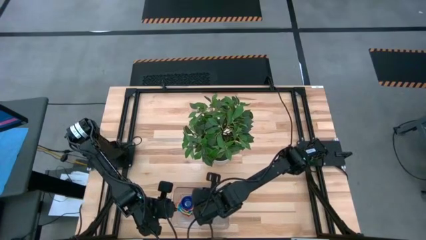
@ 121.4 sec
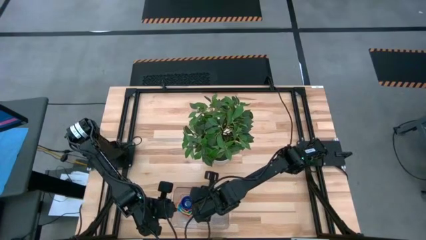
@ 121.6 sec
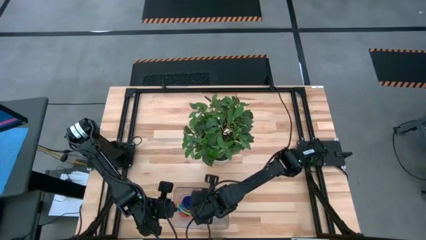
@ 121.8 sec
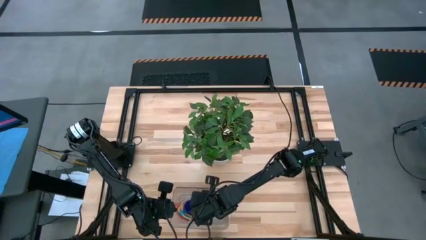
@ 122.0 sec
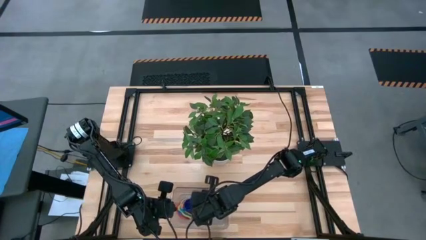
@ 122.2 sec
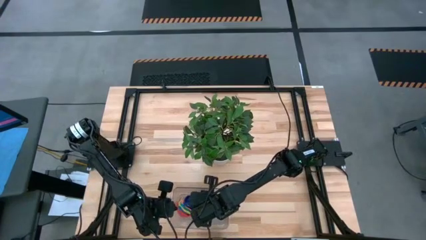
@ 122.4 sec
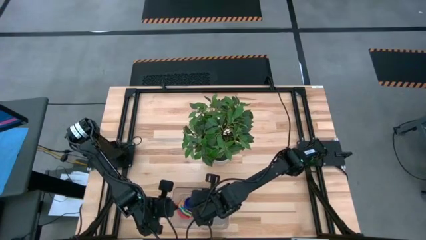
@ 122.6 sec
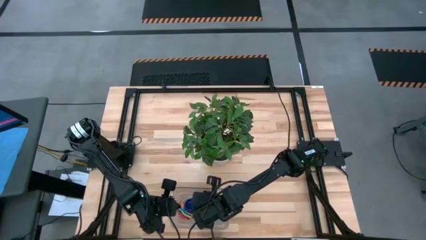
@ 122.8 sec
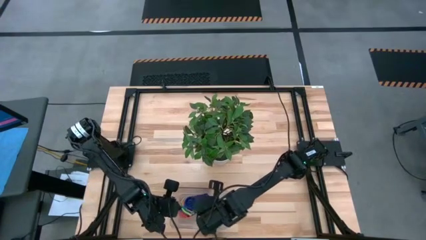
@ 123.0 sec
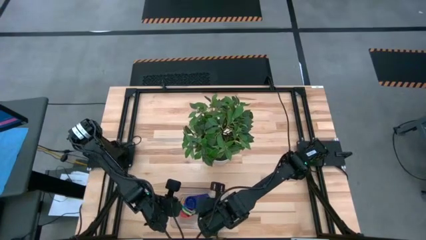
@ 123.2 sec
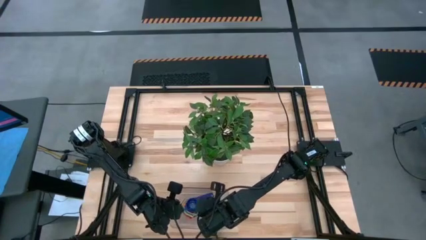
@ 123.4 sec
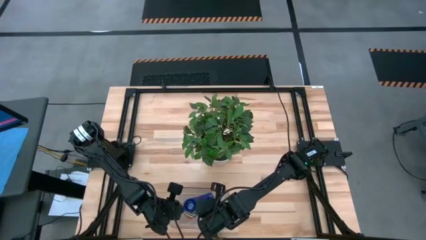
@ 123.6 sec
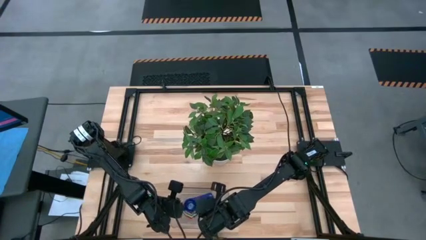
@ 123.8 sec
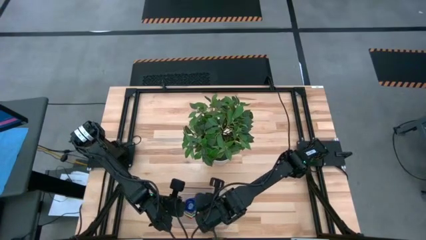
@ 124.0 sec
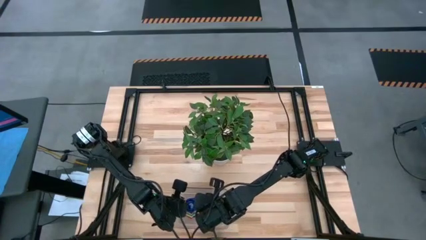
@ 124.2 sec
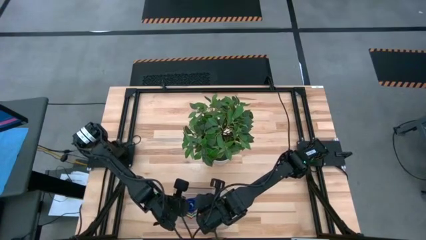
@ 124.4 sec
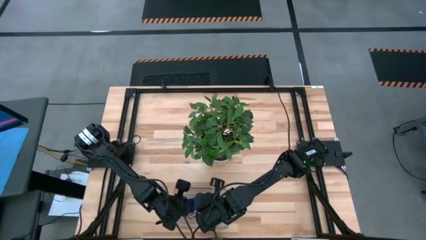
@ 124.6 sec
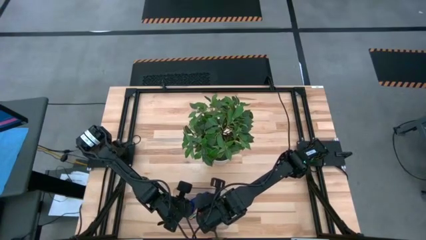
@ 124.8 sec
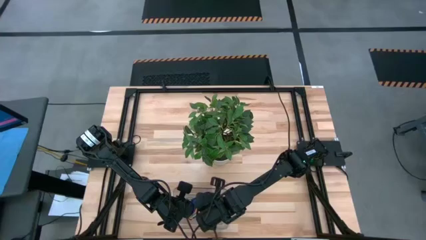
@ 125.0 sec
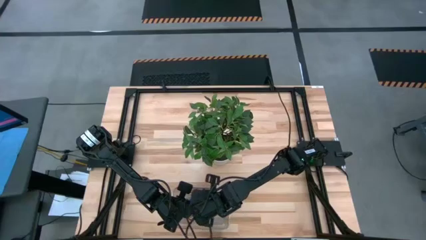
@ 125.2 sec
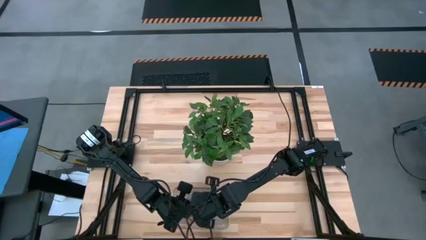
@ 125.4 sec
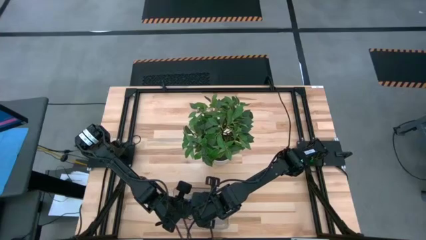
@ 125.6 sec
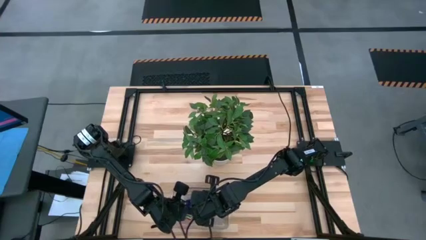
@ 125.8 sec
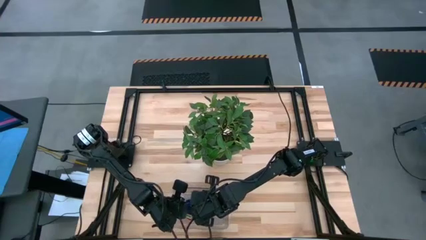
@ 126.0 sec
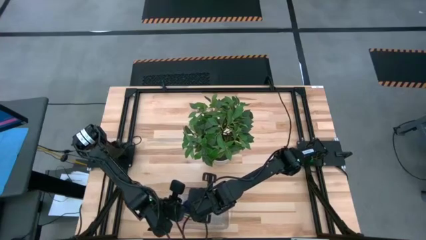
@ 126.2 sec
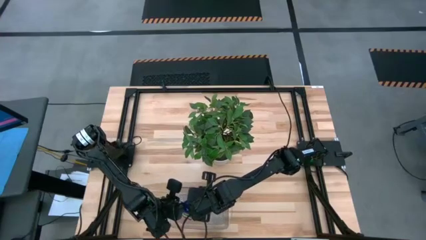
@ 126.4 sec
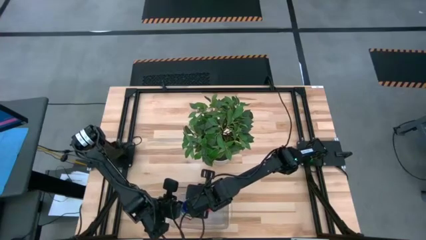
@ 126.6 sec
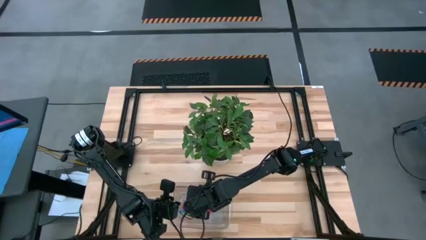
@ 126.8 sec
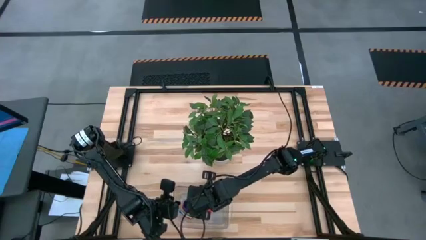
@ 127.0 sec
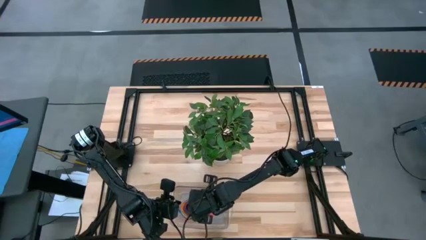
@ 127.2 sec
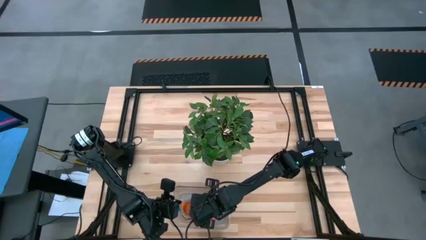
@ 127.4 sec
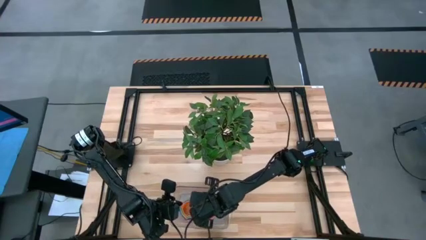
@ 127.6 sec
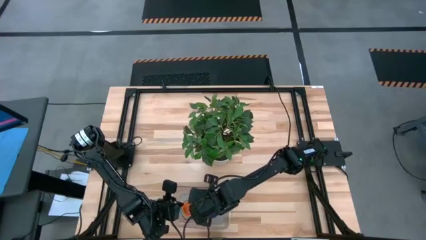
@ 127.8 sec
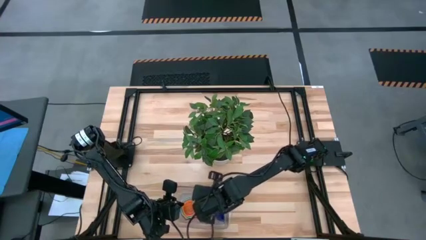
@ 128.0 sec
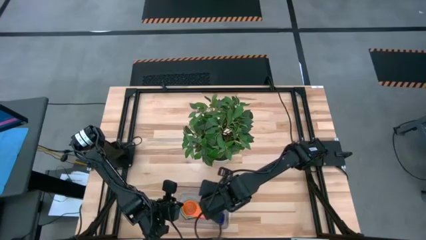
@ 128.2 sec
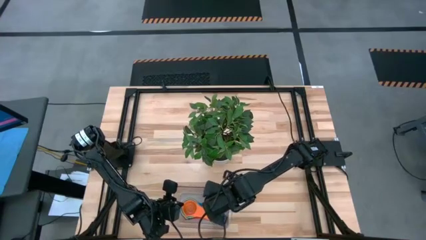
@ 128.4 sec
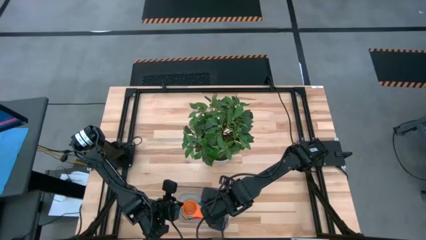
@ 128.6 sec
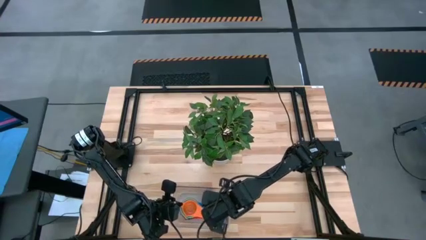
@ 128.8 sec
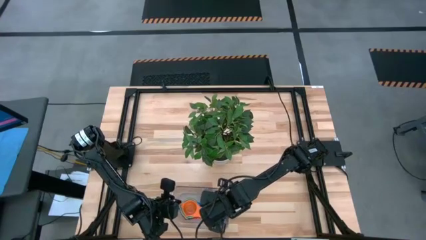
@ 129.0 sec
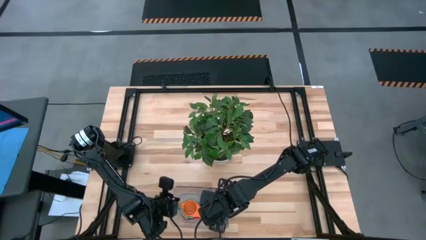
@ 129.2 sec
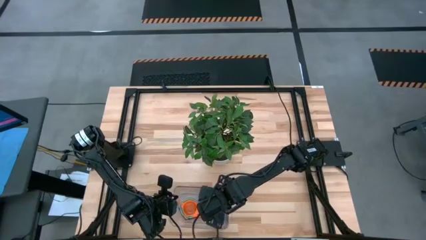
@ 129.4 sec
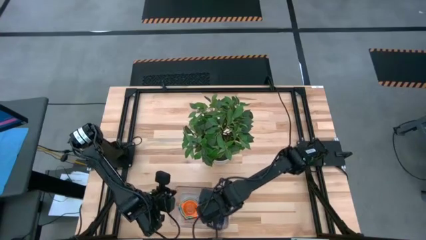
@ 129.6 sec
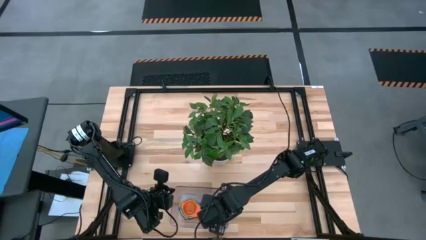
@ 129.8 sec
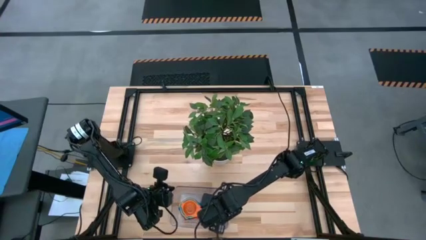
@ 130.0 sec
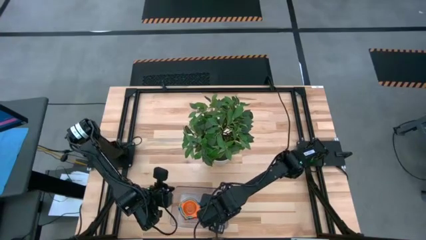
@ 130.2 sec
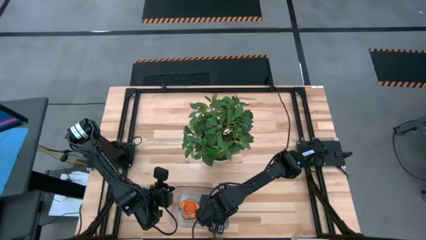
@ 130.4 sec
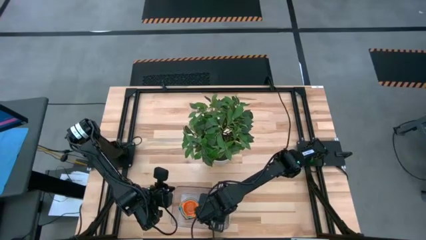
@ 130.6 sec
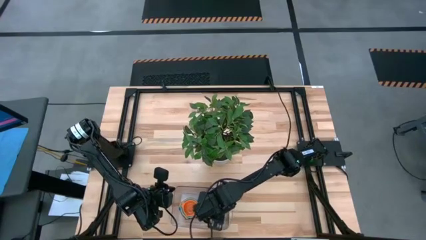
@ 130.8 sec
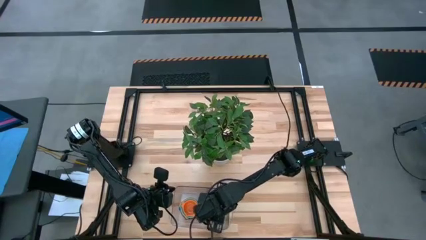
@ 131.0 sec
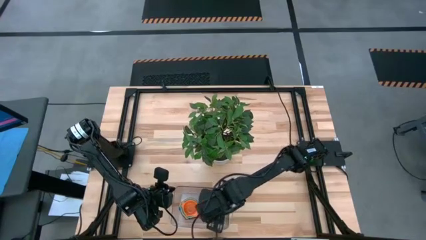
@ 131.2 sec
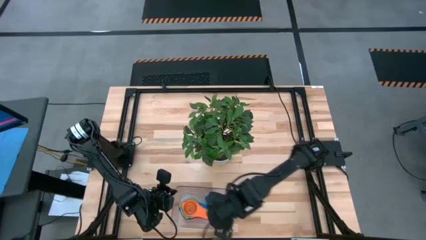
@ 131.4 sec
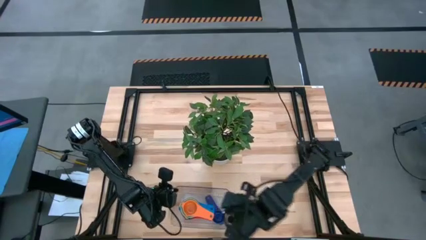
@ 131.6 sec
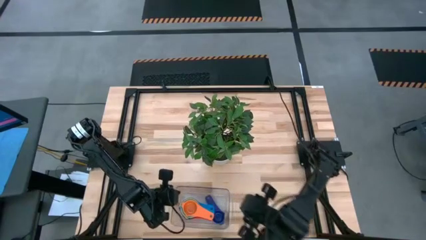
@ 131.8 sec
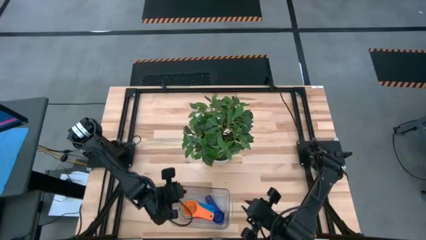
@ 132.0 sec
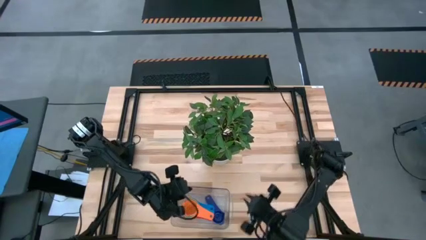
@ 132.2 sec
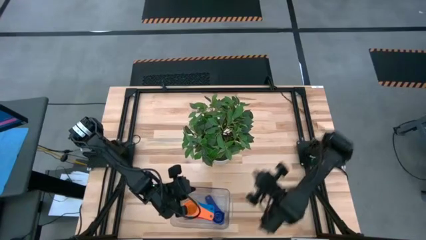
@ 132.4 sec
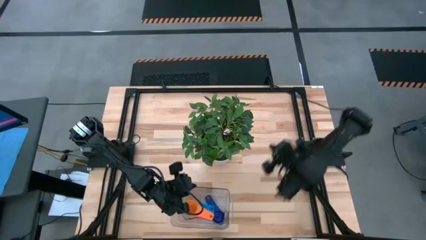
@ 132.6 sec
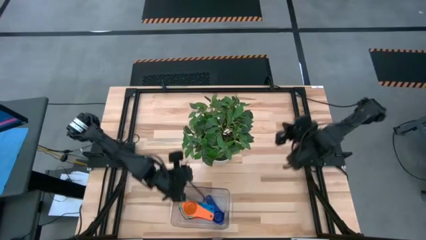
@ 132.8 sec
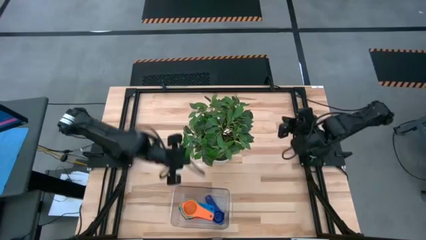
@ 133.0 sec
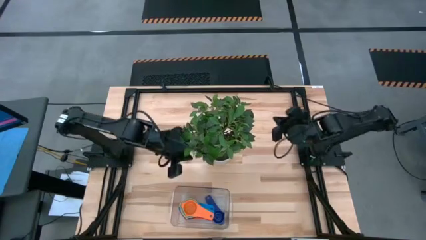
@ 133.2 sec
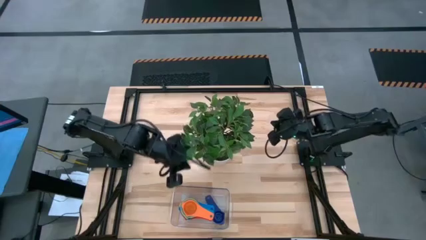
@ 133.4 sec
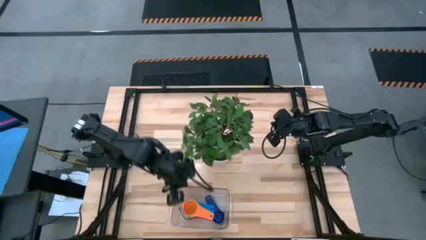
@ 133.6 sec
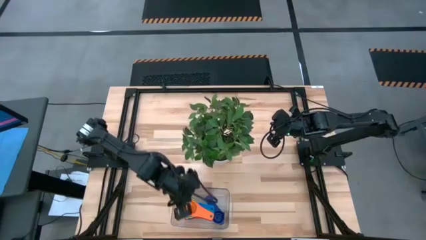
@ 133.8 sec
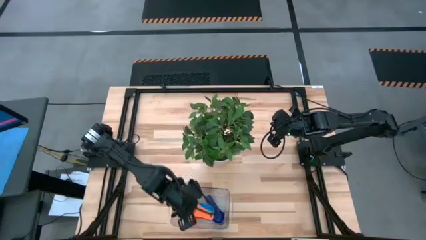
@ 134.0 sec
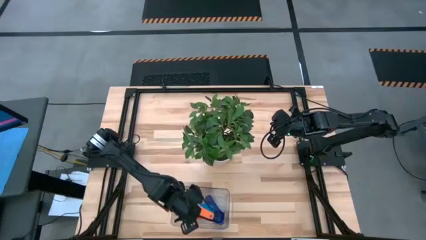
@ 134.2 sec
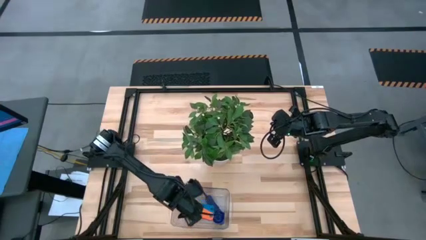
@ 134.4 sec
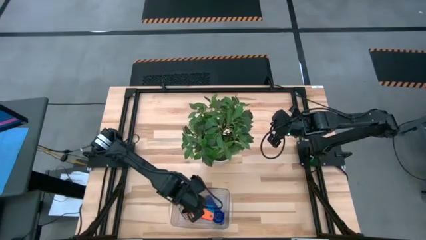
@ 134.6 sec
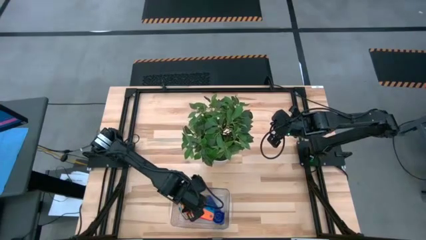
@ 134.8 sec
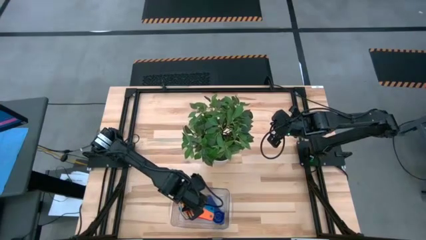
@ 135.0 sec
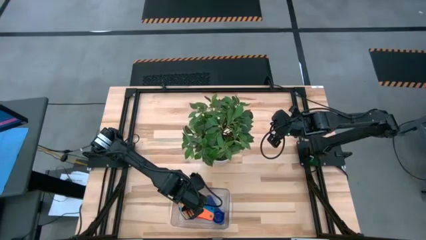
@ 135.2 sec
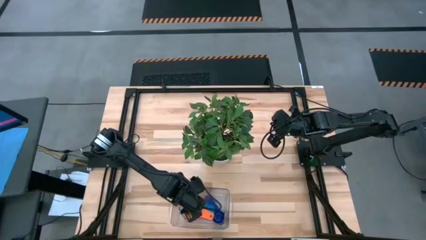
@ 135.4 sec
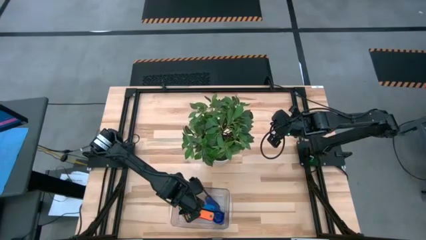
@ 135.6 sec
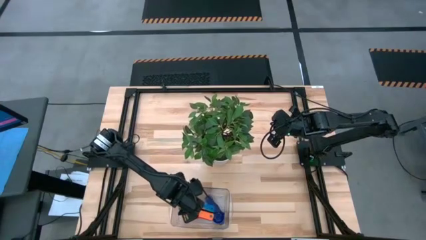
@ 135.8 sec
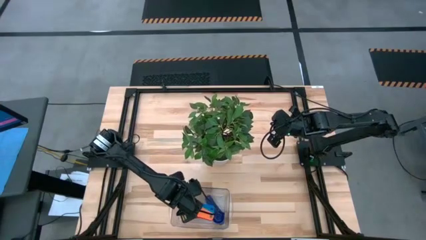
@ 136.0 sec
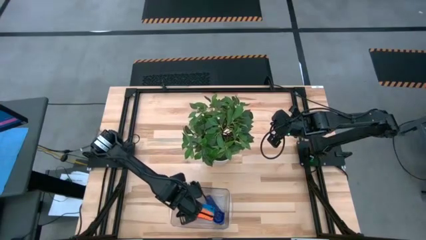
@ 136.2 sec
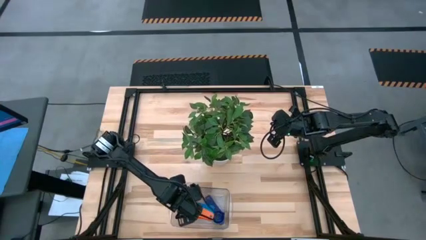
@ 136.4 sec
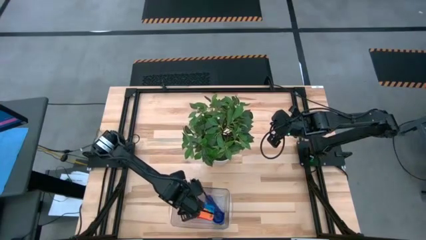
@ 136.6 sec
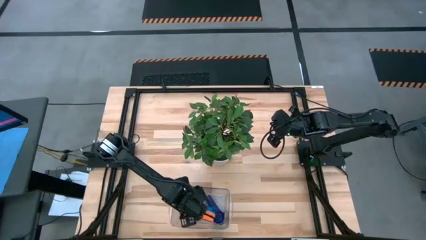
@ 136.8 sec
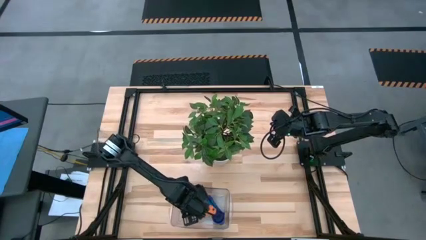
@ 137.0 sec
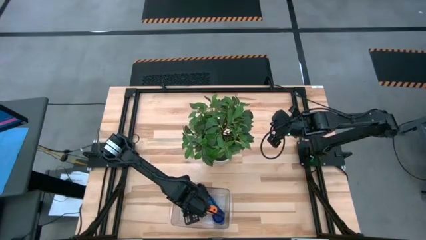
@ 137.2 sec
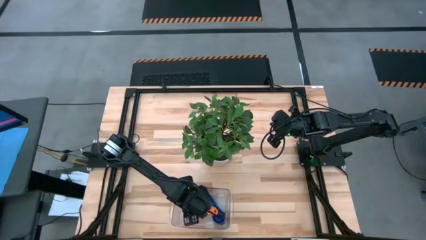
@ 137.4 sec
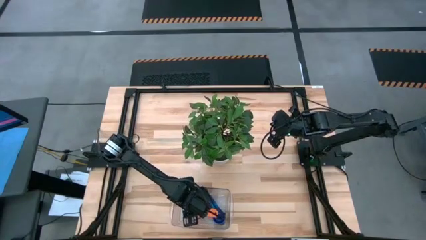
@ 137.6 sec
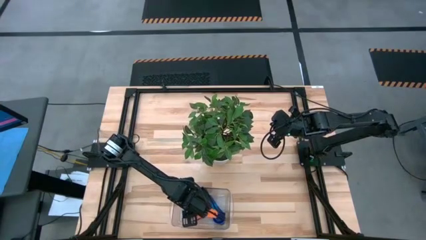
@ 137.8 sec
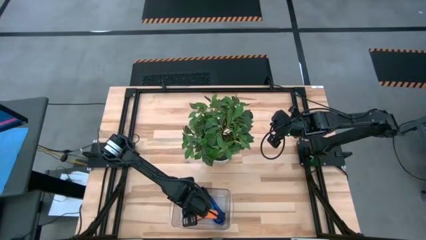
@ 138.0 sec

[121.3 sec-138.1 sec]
Task: Nest measuring cups in basket
Stack the dark blue measuring cup on the orange measuring cup
